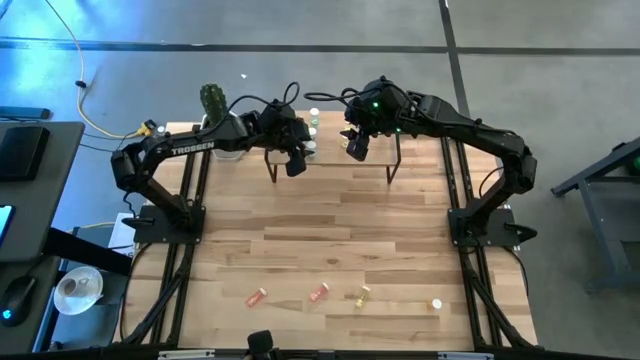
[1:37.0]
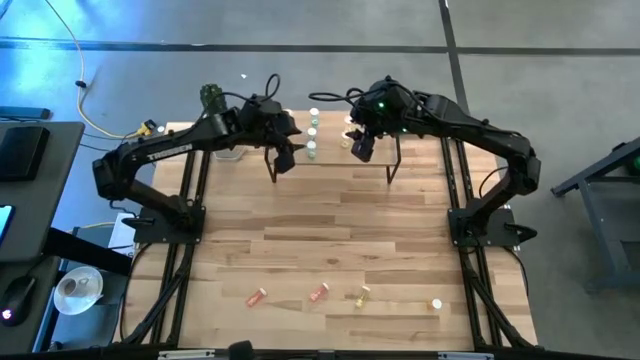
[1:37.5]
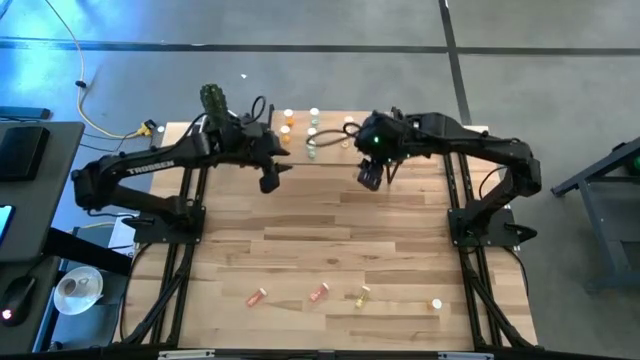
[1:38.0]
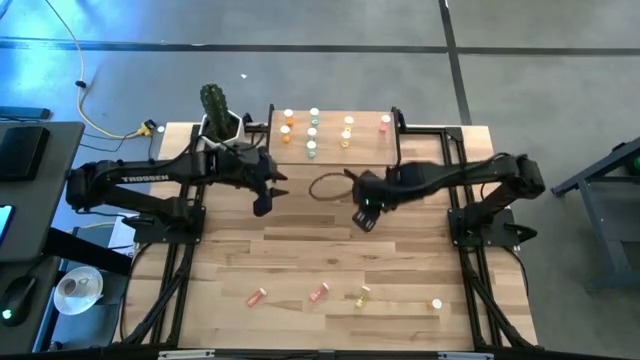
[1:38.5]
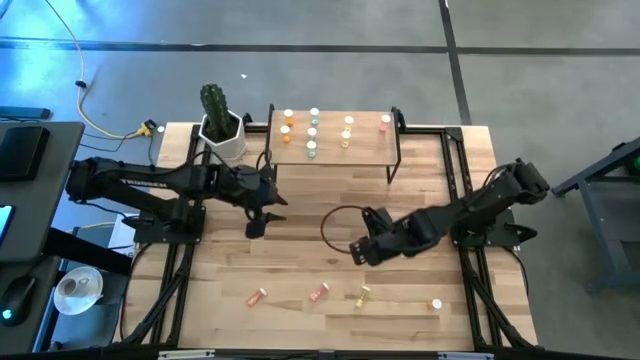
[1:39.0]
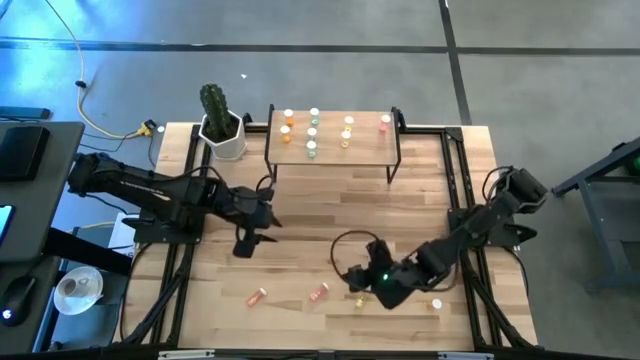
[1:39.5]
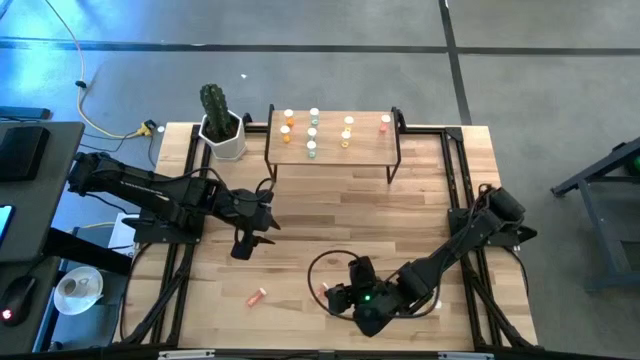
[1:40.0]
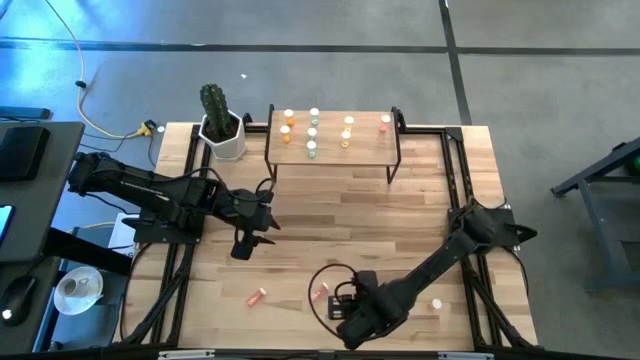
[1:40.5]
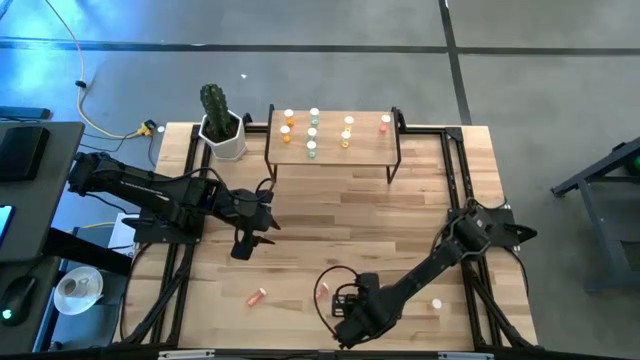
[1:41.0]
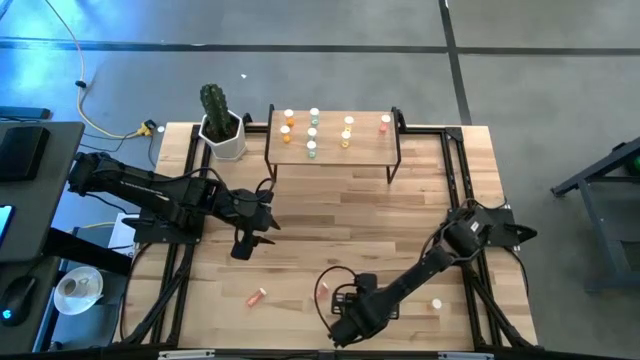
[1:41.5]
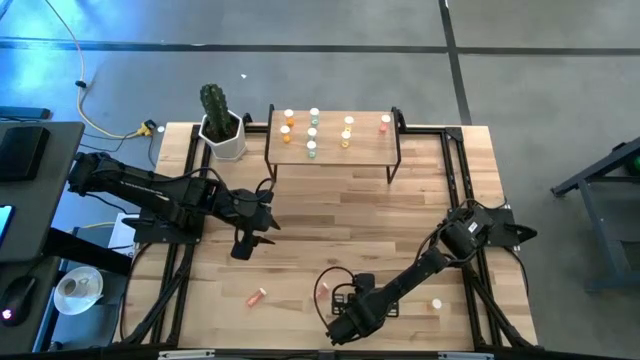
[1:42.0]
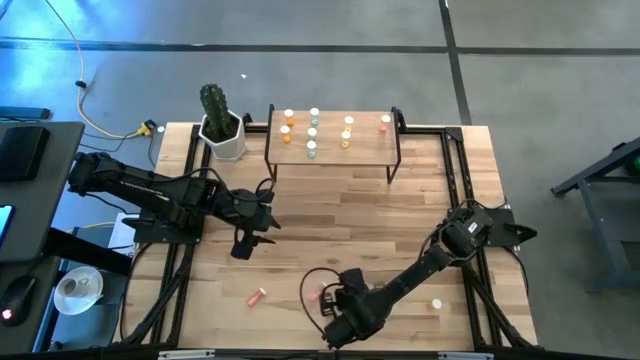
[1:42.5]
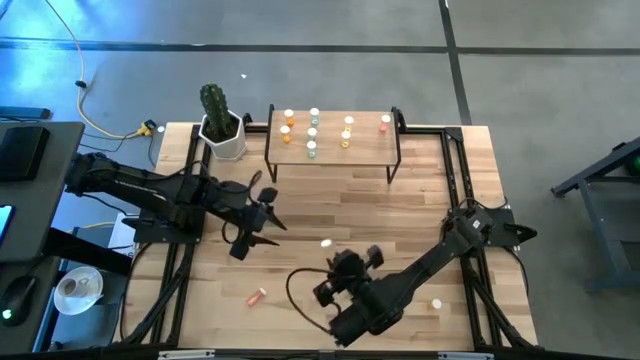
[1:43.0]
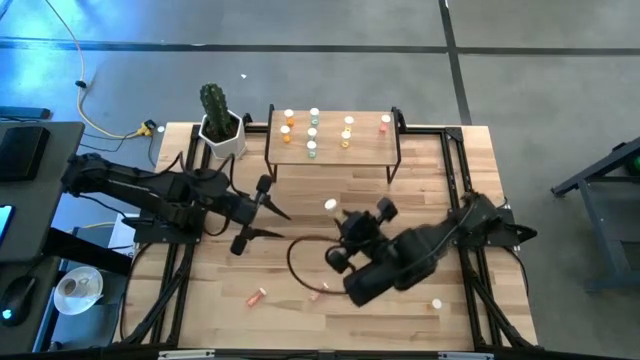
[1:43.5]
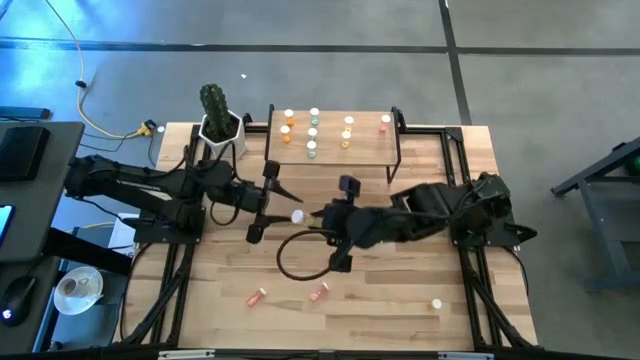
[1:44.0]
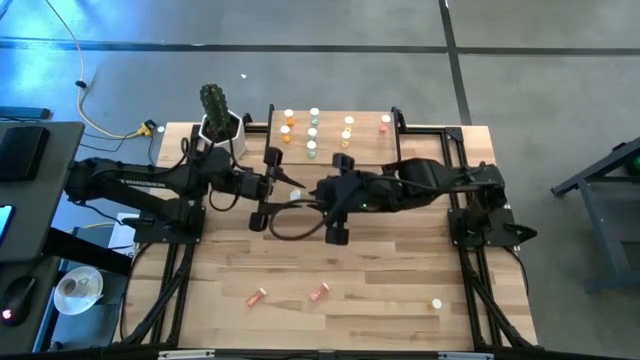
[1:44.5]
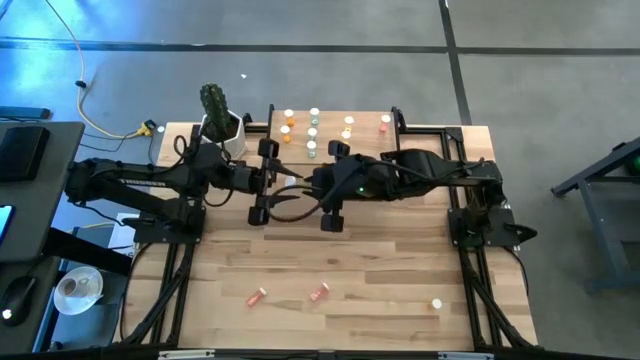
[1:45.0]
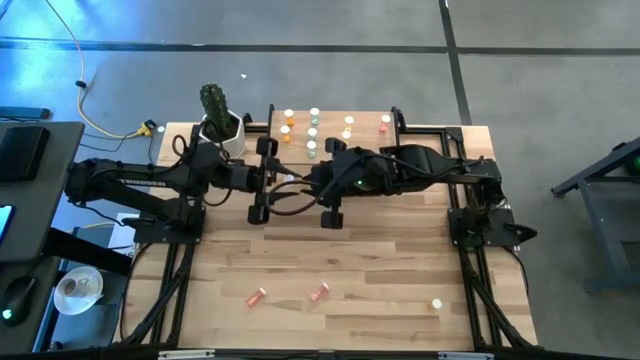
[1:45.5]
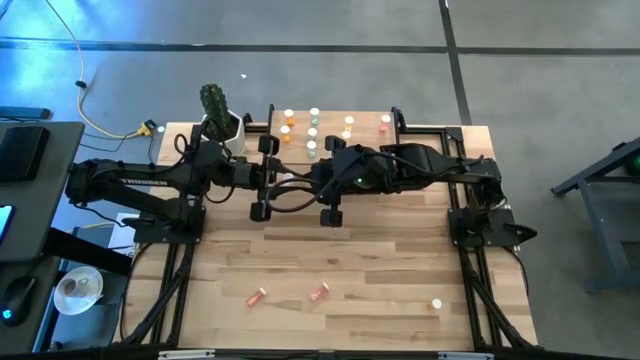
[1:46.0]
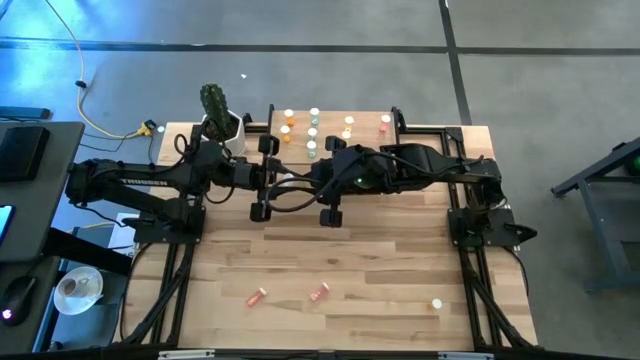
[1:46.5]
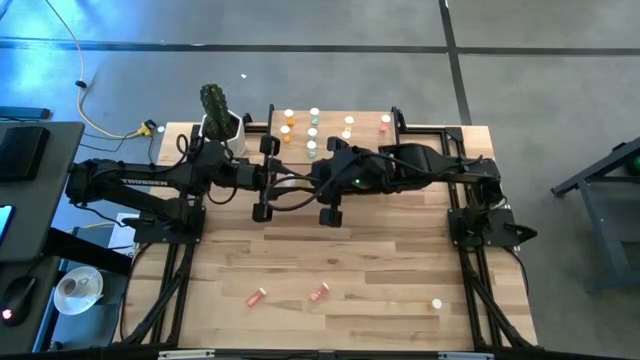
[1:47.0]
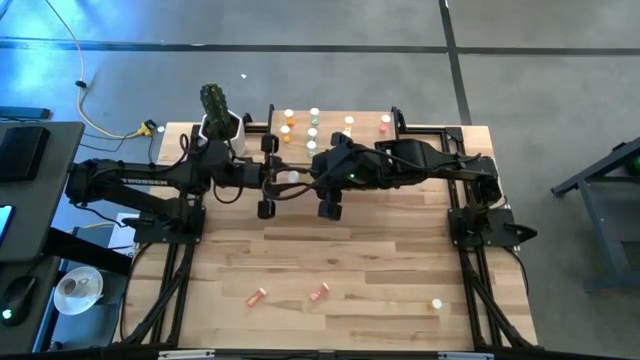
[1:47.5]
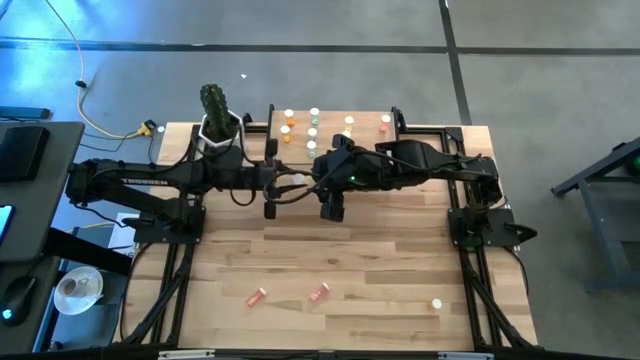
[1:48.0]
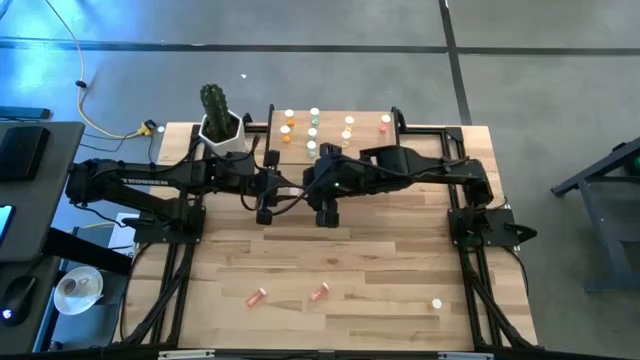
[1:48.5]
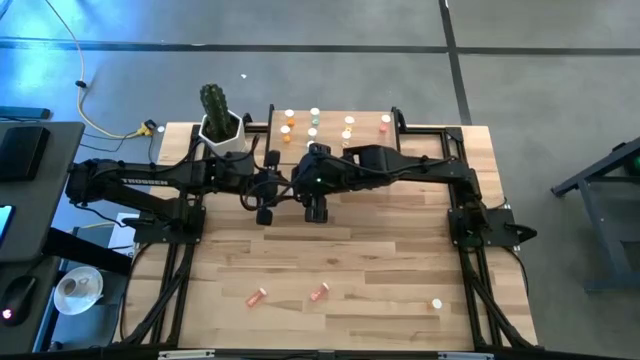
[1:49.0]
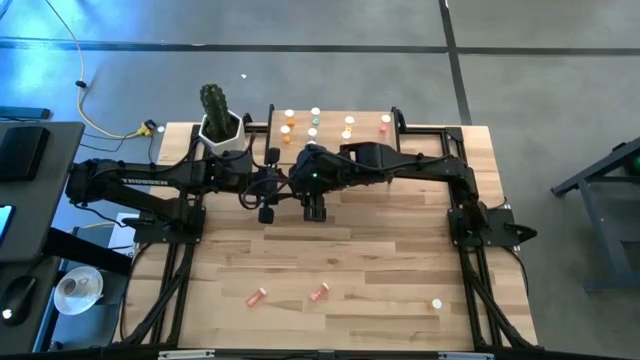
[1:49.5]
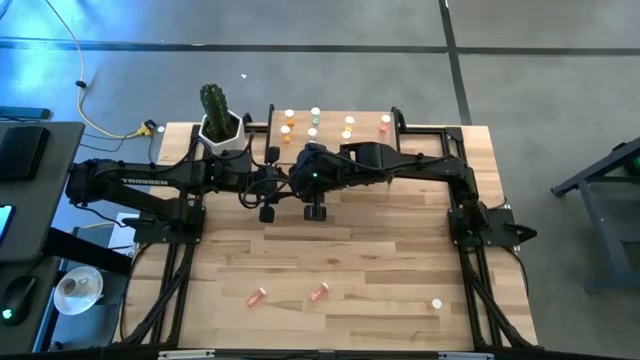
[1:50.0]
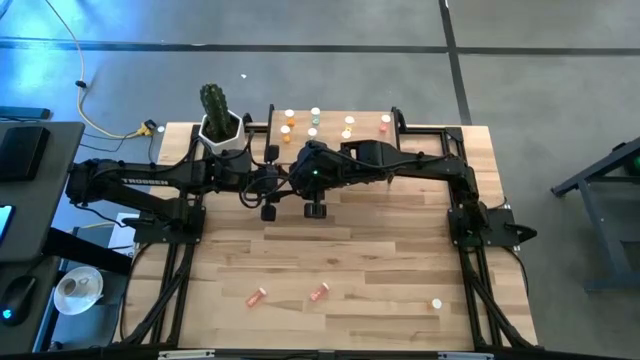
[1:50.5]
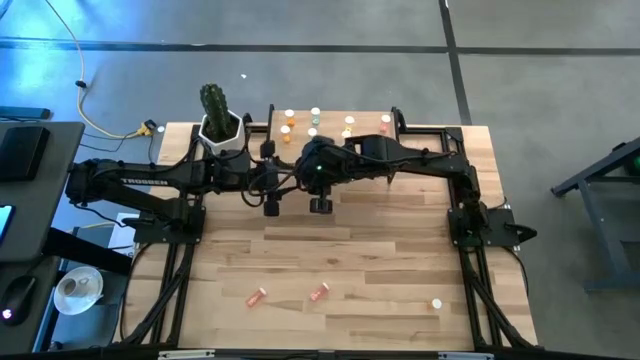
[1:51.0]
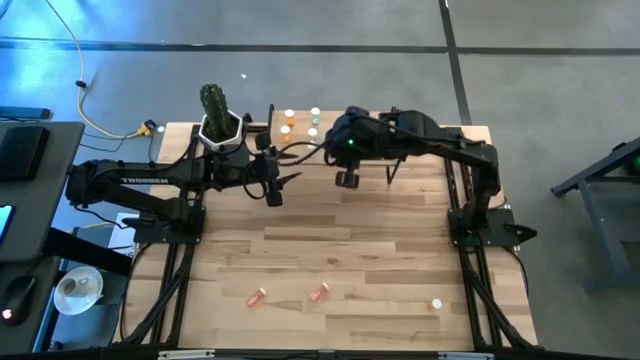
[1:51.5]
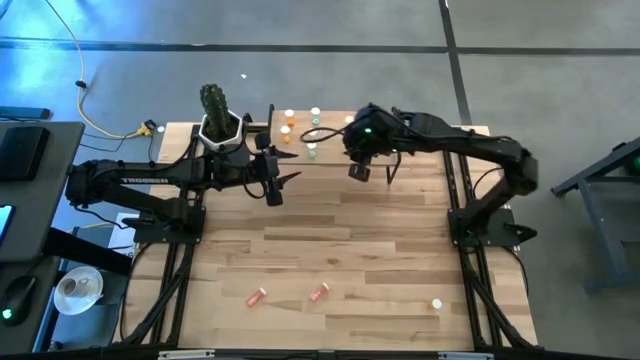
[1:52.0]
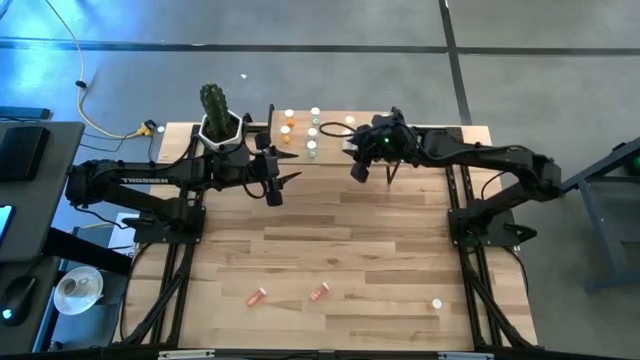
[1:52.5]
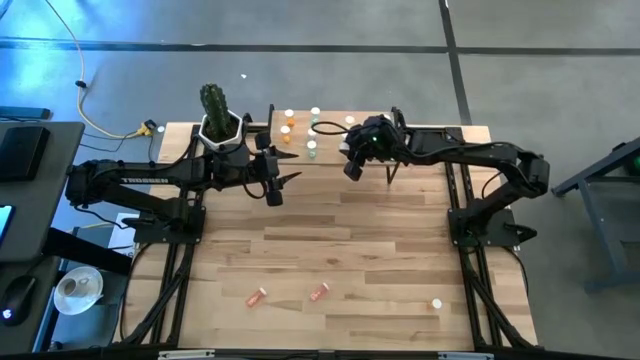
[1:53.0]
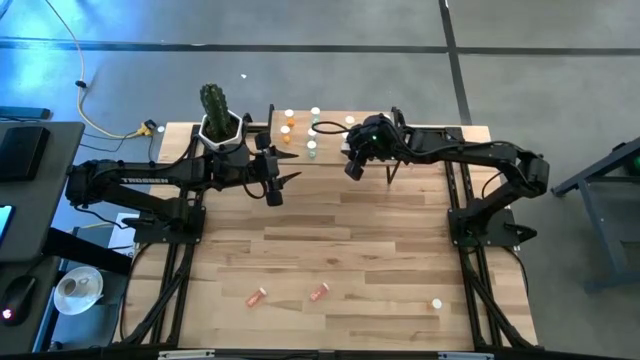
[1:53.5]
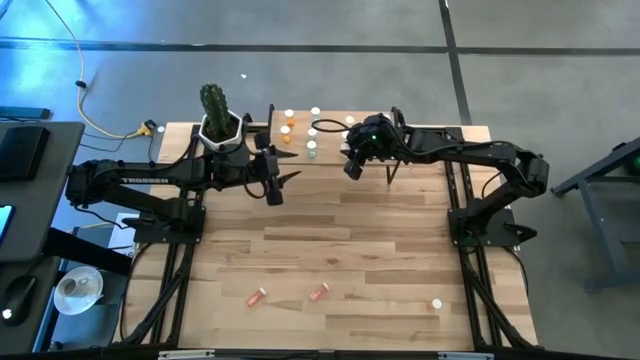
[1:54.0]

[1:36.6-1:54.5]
Task: Pick and place medicine bottles onto shelf by color
Put the yellow pill bottle on the shelf

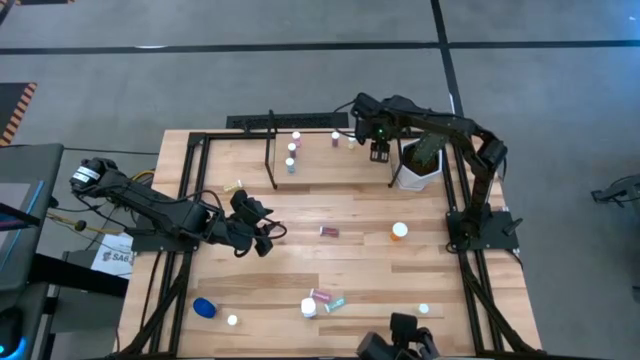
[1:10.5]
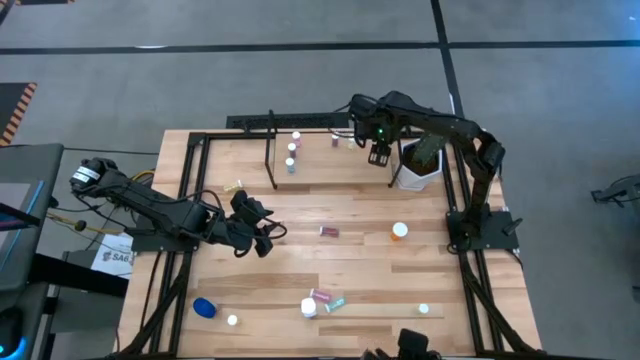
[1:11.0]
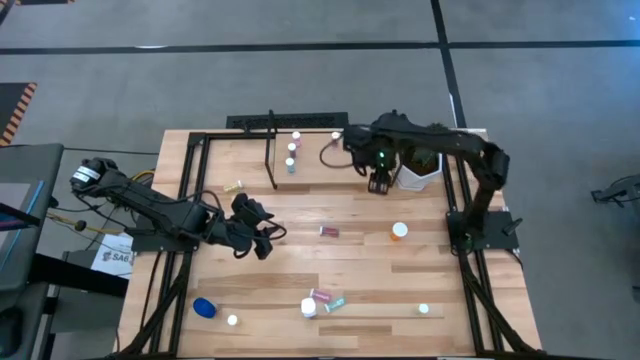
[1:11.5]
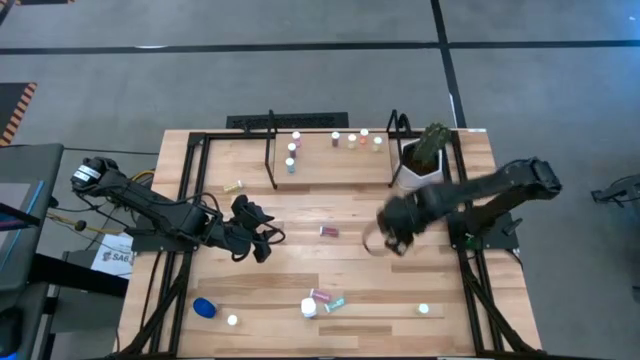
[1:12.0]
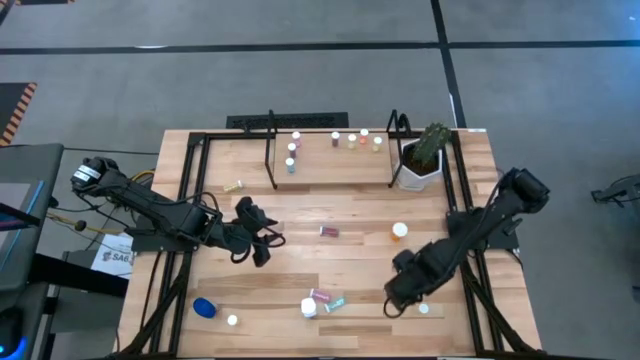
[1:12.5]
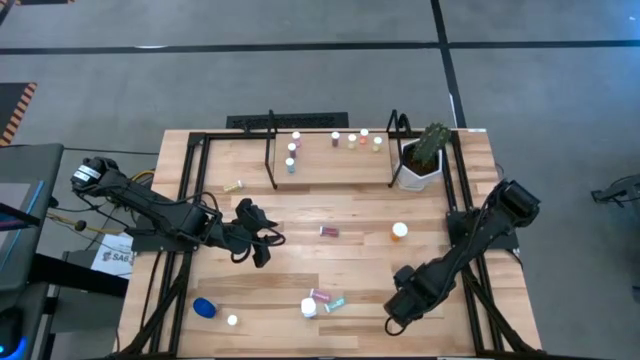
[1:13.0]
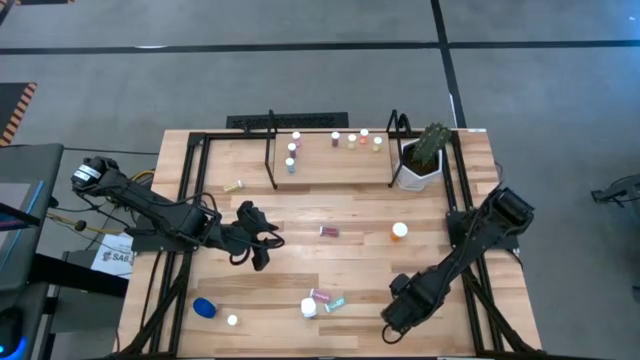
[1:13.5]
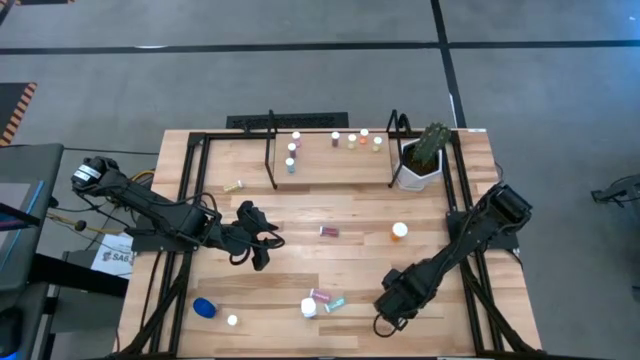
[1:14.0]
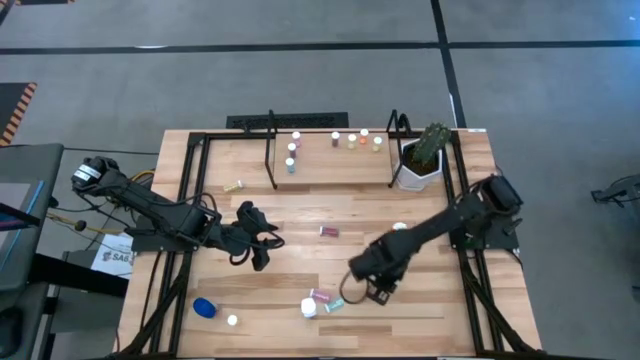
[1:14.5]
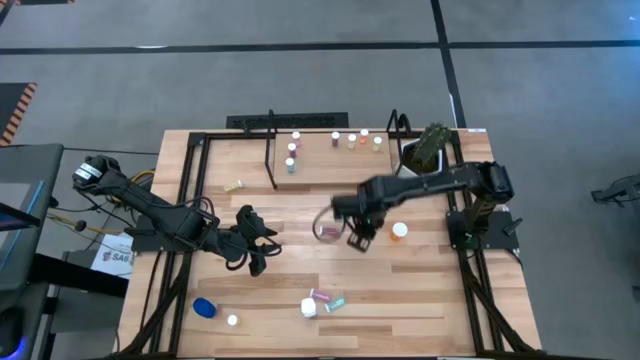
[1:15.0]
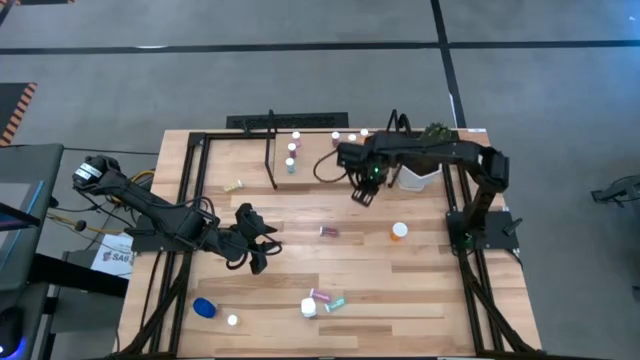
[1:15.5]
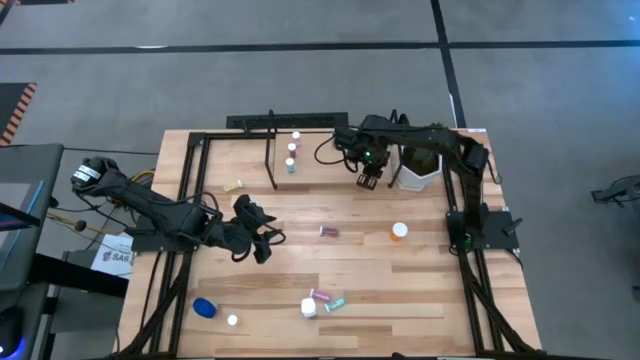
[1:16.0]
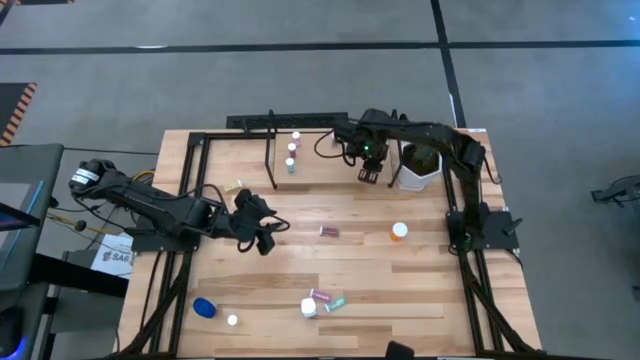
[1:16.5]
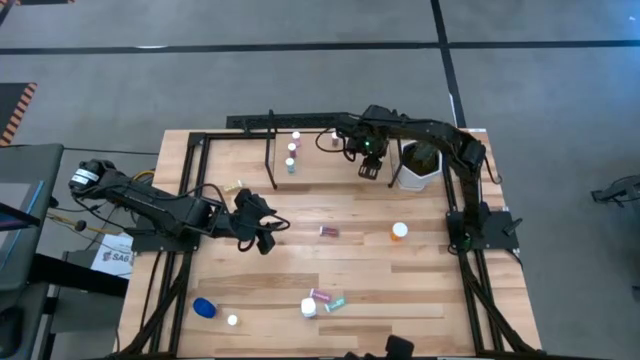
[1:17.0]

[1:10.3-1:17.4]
Task: Pick and place medicine bottles onto shelf by color
Put the yellow pill bottle on the shelf
